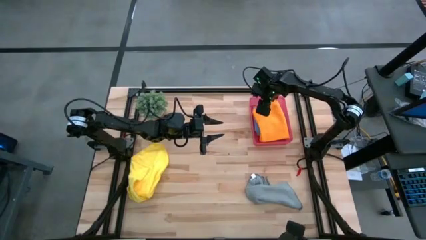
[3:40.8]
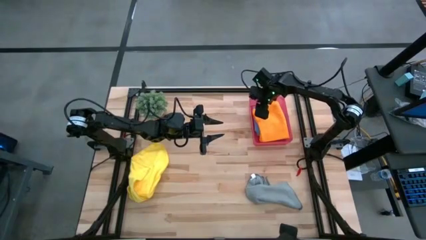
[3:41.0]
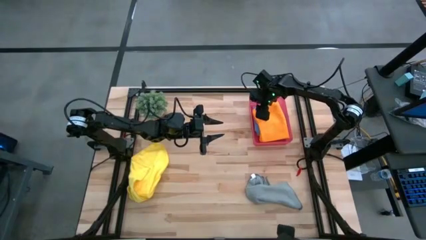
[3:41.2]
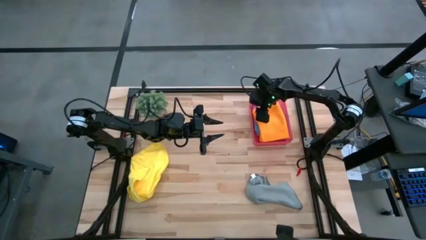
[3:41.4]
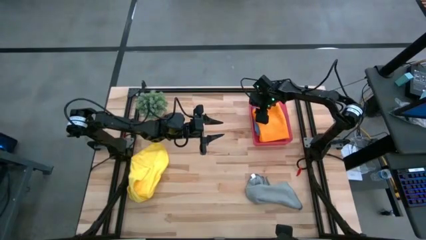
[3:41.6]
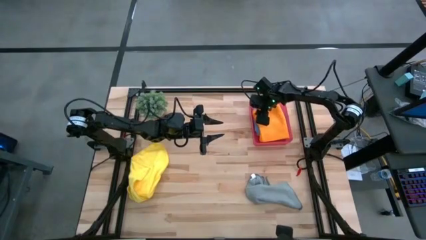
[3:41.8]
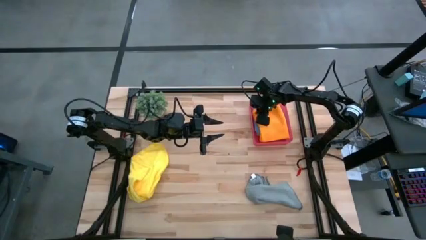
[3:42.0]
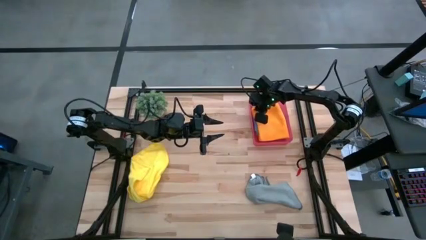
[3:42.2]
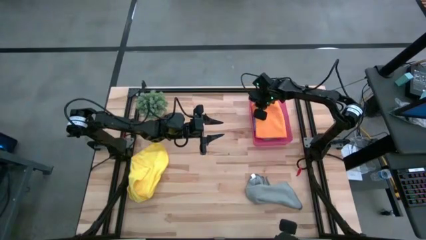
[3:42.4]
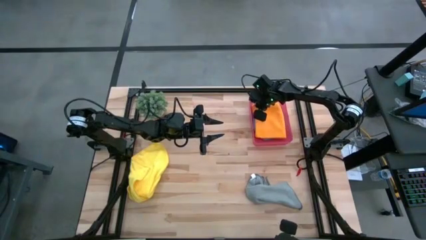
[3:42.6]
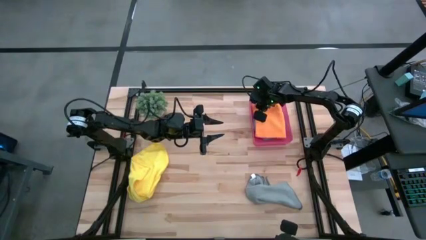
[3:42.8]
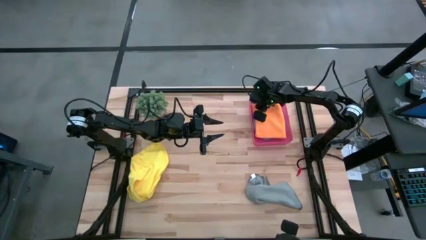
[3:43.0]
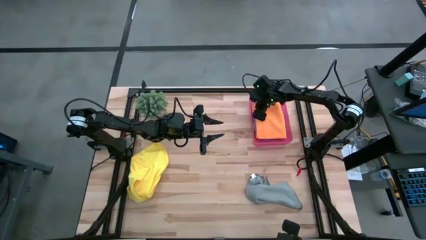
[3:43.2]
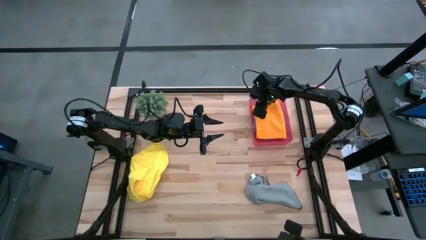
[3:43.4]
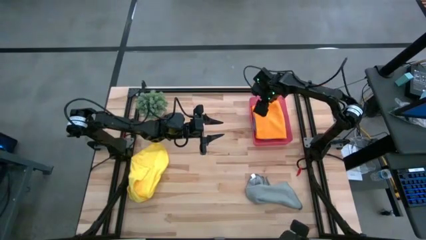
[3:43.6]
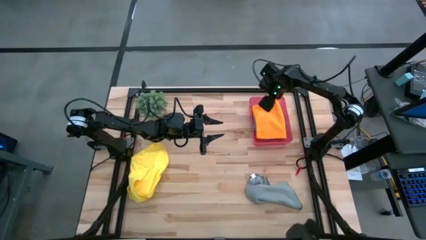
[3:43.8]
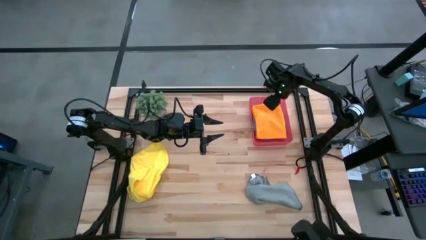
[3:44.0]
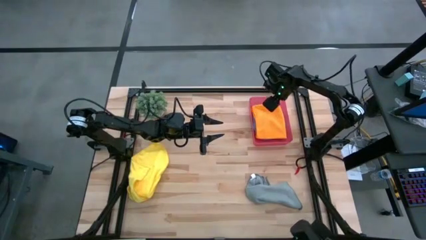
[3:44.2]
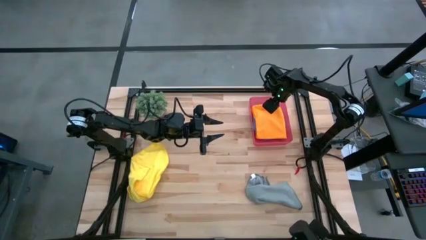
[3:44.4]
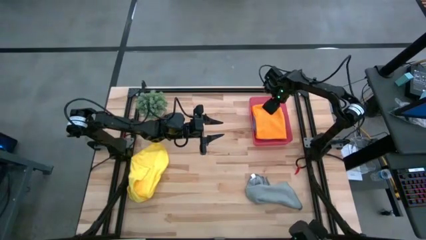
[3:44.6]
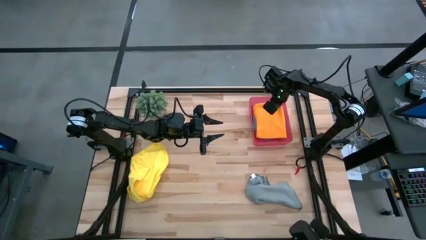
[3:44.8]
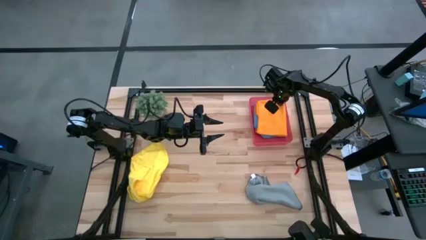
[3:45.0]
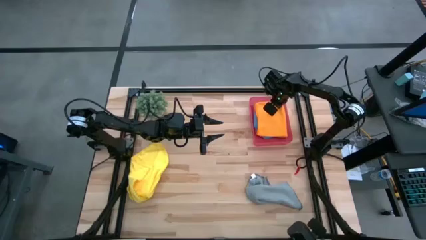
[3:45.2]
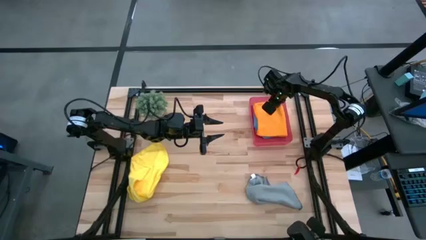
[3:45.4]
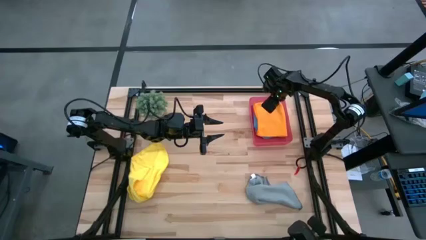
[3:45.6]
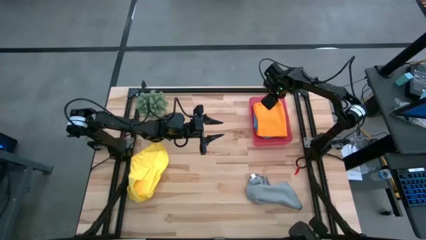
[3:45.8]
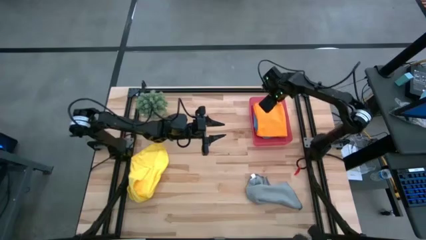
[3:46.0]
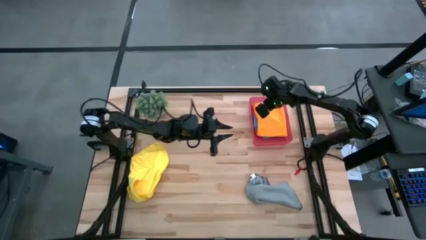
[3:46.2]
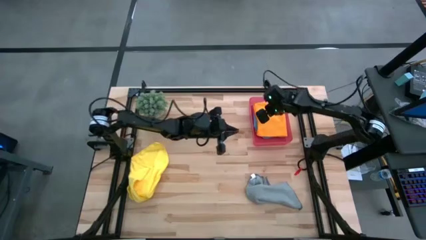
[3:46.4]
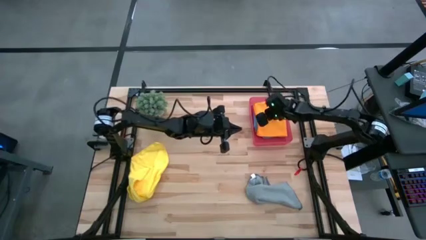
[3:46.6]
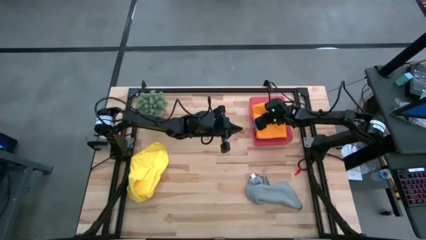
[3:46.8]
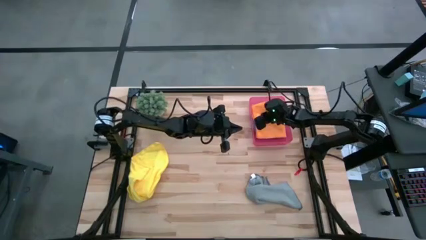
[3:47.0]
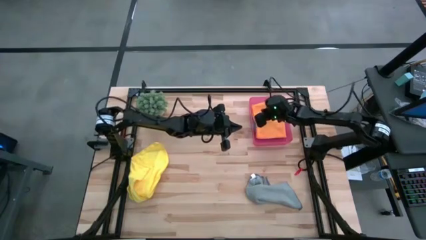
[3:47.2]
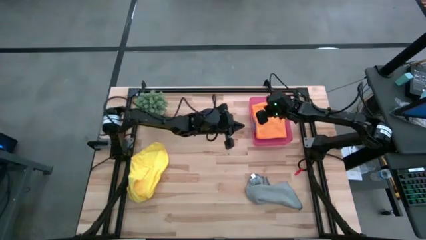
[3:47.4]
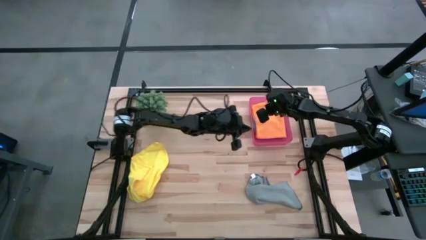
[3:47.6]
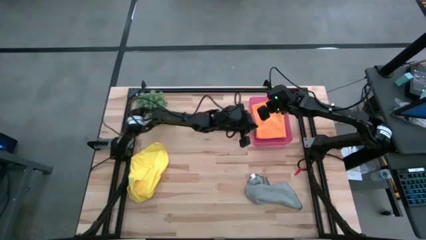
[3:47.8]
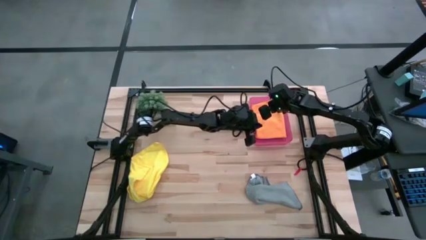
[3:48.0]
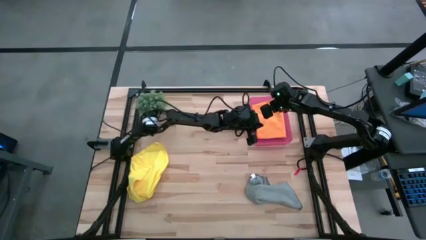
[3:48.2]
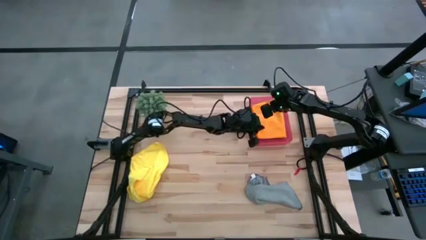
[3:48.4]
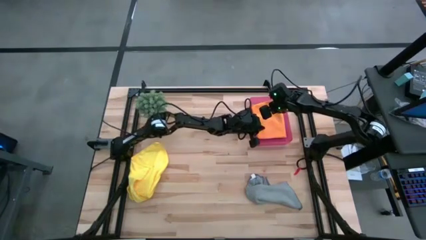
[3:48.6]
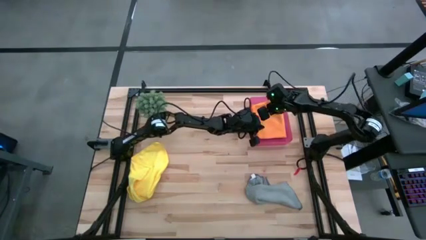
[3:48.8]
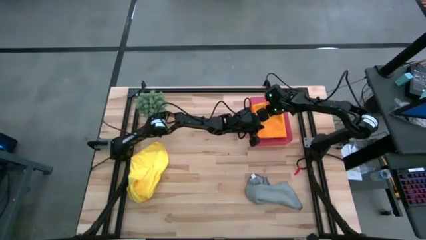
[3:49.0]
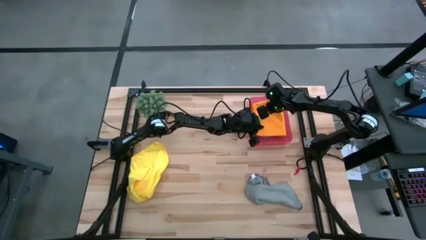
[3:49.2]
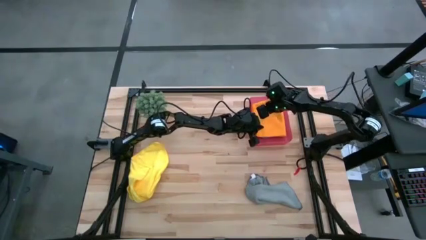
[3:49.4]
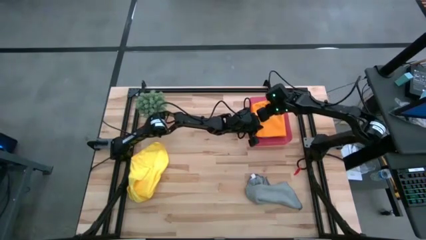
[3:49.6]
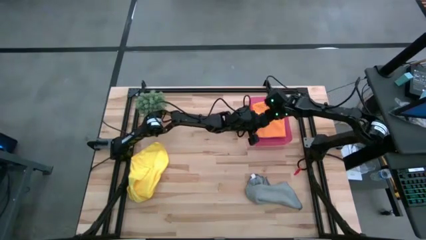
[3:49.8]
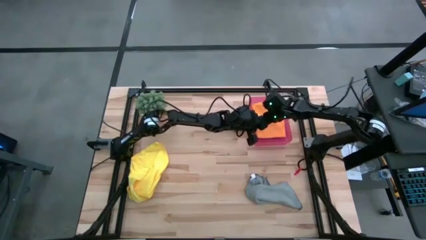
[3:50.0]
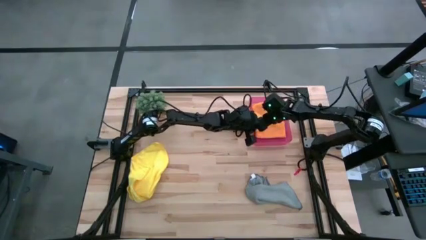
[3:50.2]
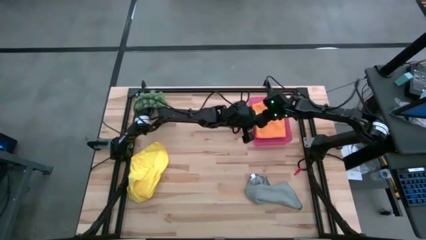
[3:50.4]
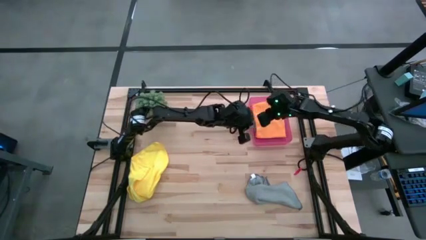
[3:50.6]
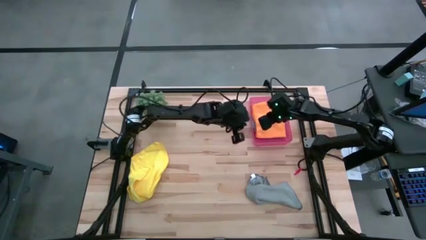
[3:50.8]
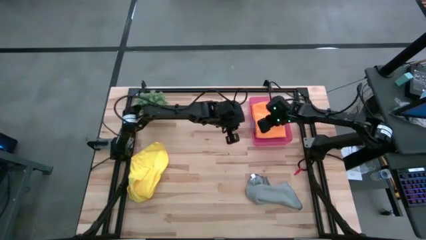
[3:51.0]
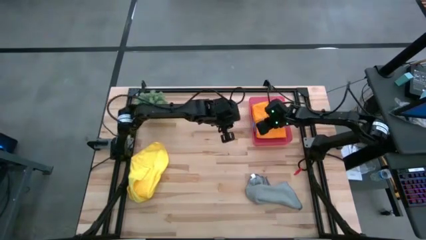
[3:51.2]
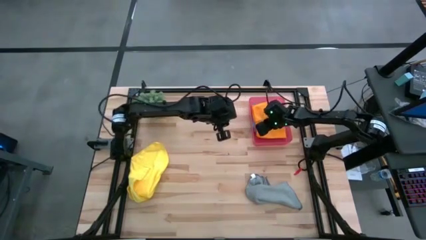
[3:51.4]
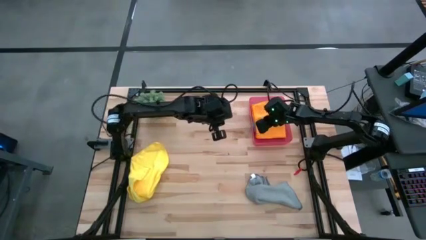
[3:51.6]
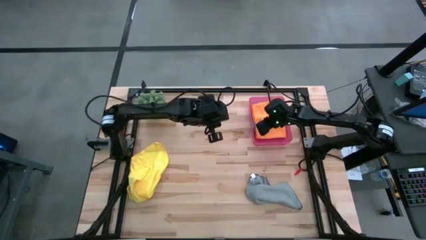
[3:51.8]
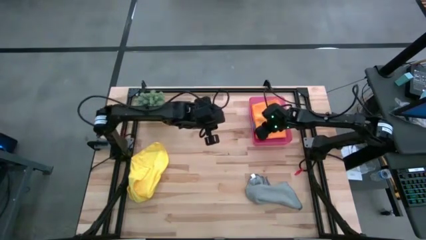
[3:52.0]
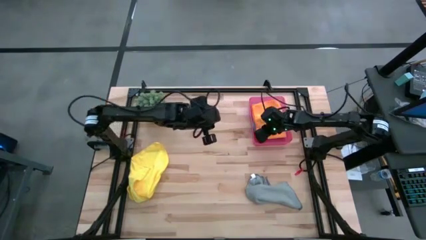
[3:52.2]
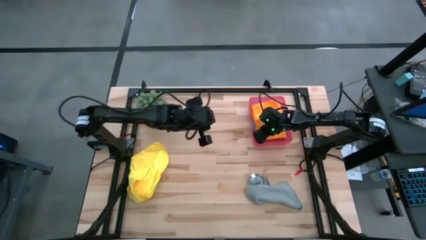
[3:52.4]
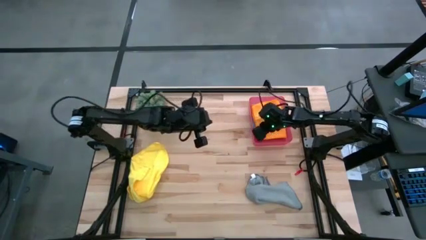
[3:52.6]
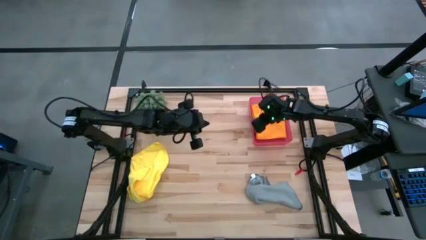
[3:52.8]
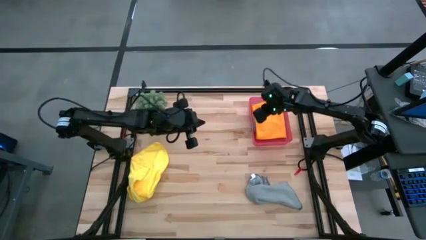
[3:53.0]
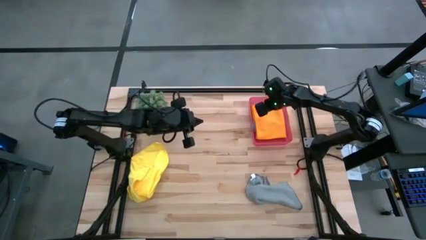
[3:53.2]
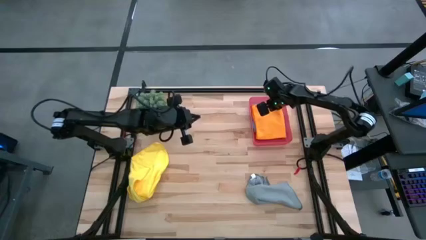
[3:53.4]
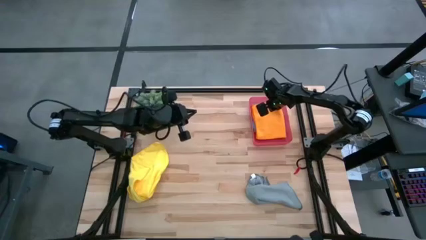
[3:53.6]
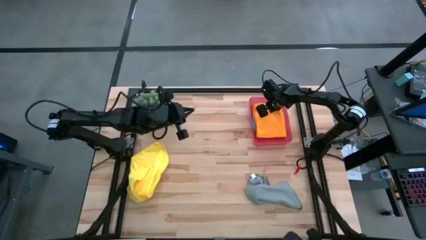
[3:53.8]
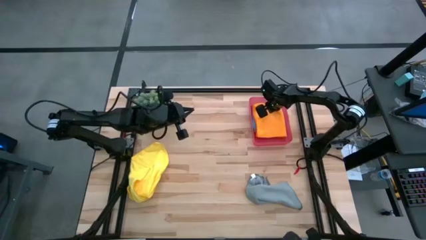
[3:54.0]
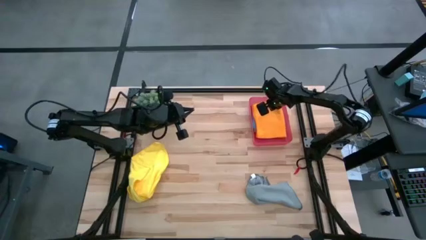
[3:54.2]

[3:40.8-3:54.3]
Task: Fold microfiber towels
Put the orange microfiber cloth into the pink bin

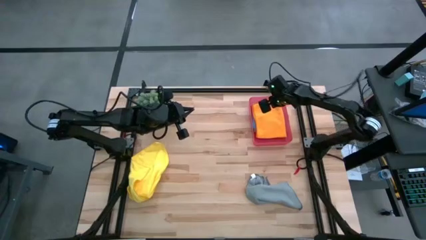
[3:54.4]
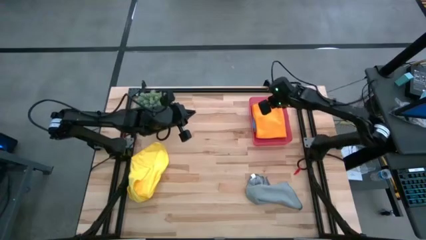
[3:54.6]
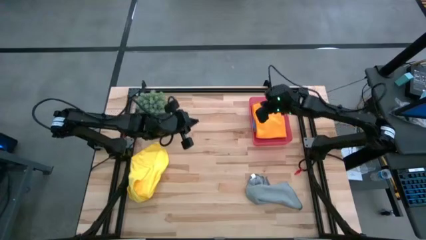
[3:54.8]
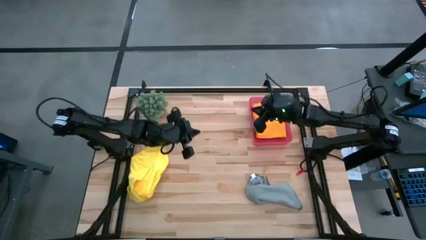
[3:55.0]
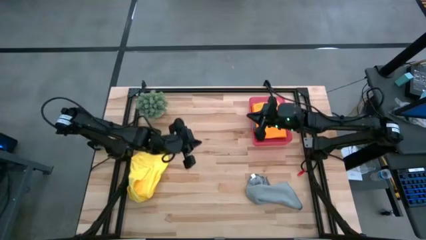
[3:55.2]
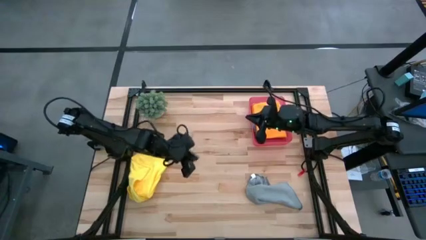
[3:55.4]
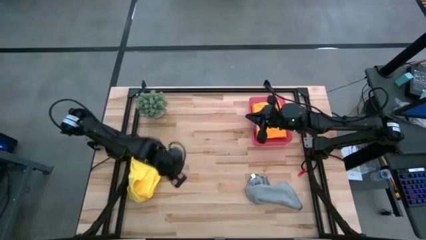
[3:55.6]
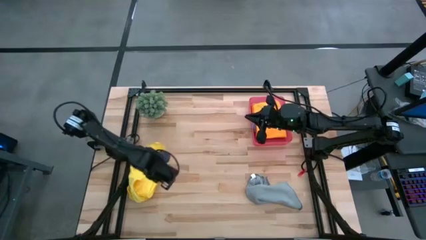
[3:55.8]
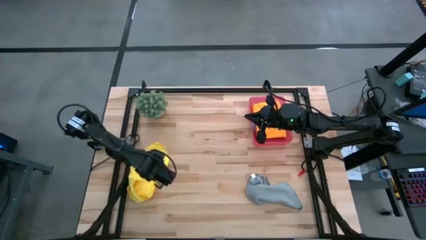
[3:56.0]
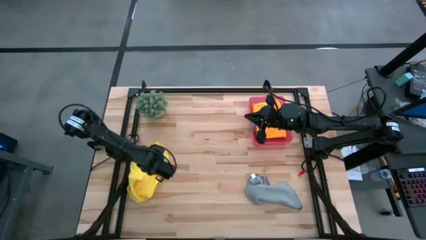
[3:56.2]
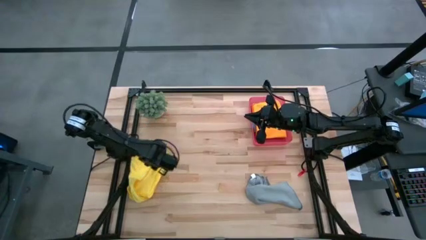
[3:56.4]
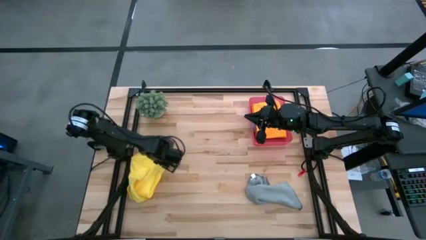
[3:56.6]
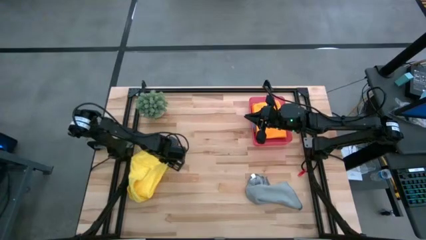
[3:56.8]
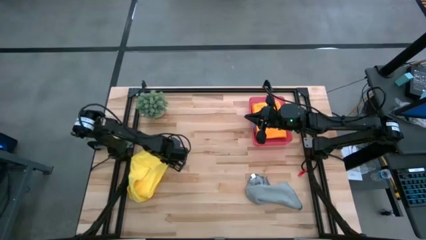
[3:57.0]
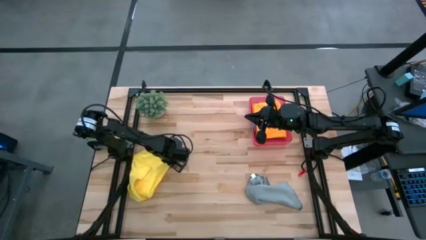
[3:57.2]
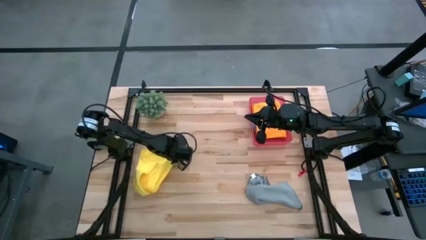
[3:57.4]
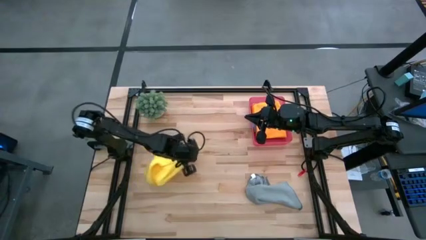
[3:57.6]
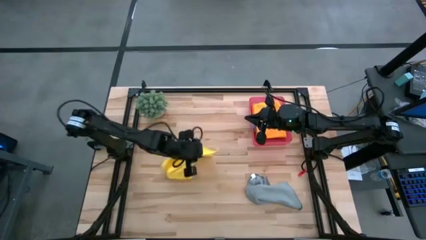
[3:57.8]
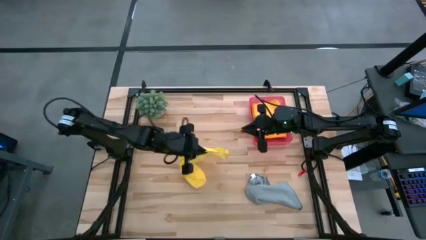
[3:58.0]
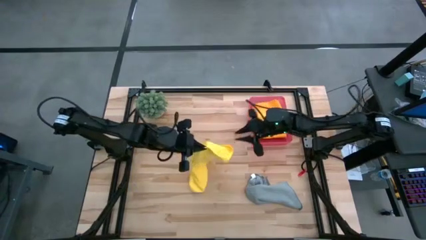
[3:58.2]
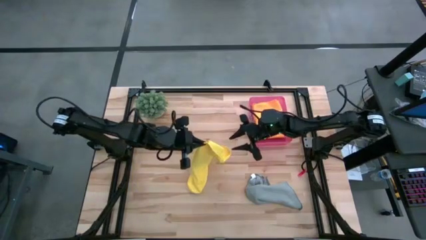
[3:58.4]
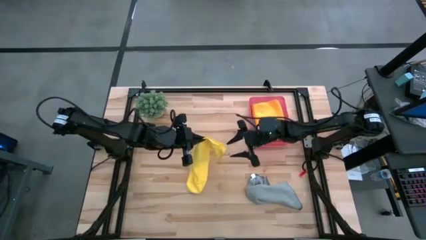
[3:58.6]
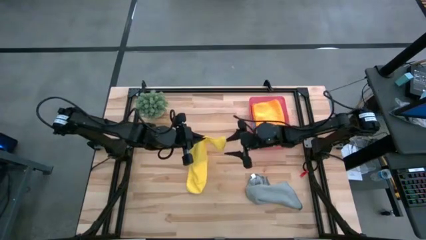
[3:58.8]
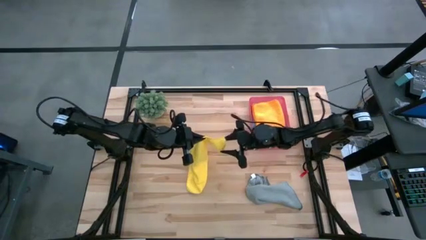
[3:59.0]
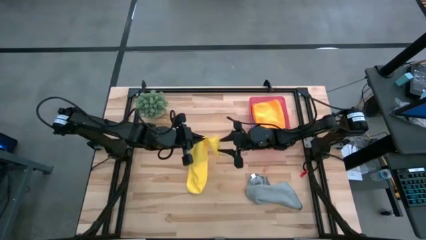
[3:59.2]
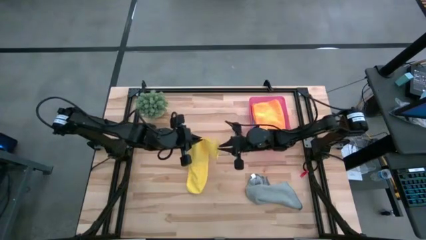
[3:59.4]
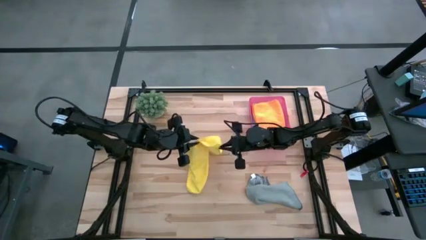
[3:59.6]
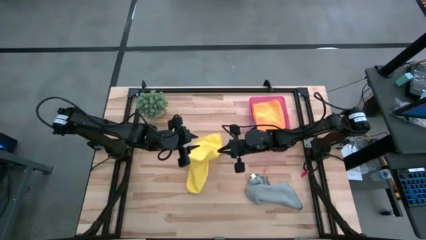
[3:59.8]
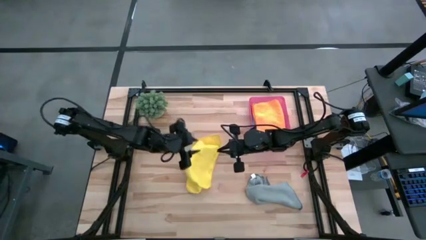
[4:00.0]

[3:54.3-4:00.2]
Fold the yellow microfiber cloth
